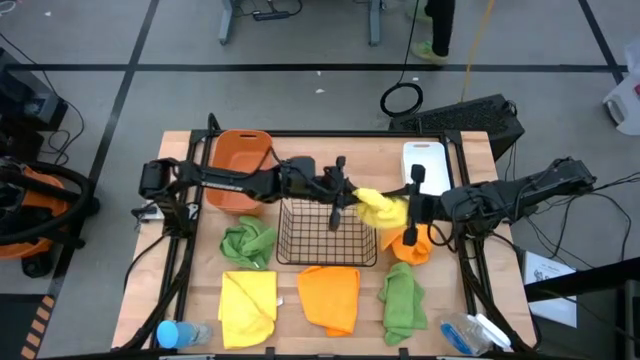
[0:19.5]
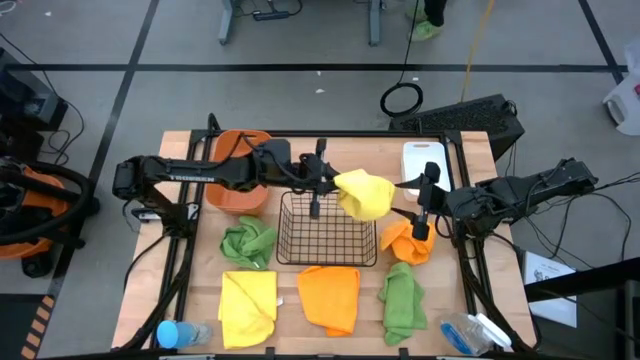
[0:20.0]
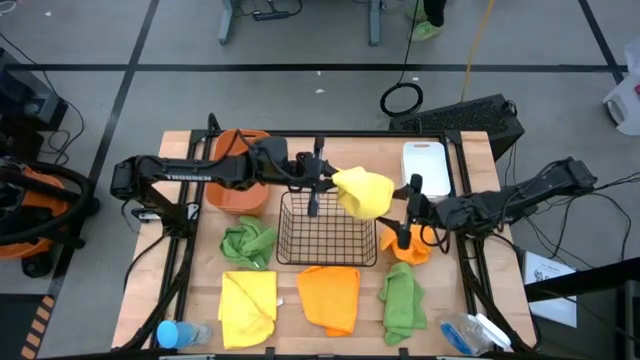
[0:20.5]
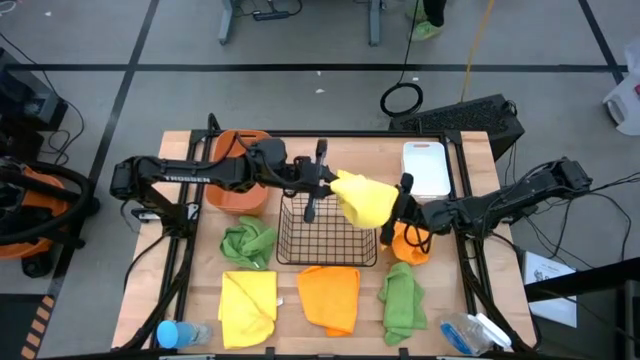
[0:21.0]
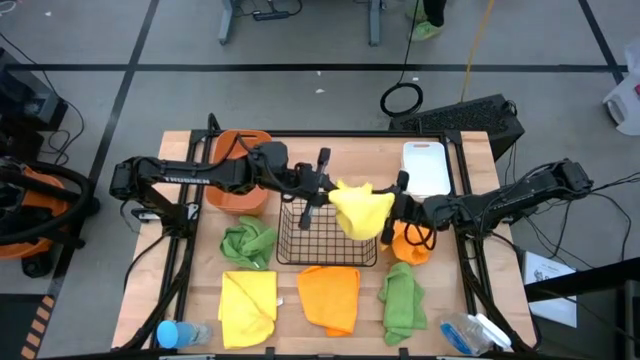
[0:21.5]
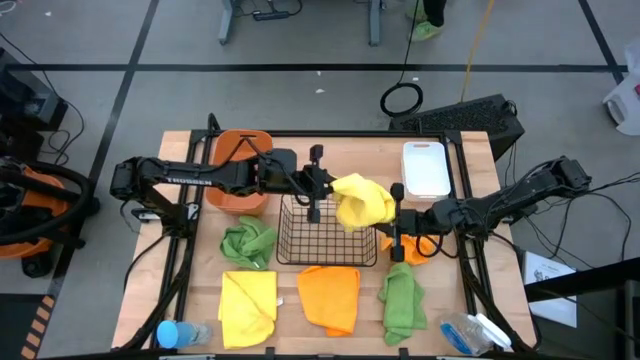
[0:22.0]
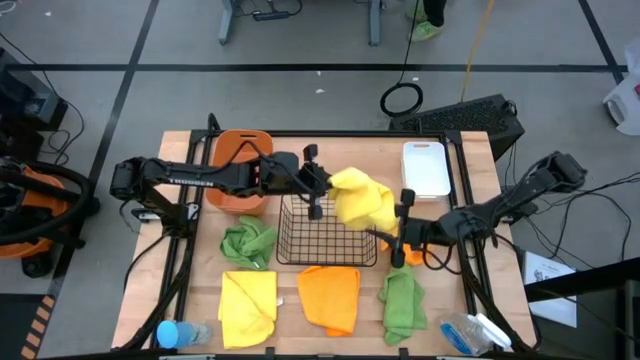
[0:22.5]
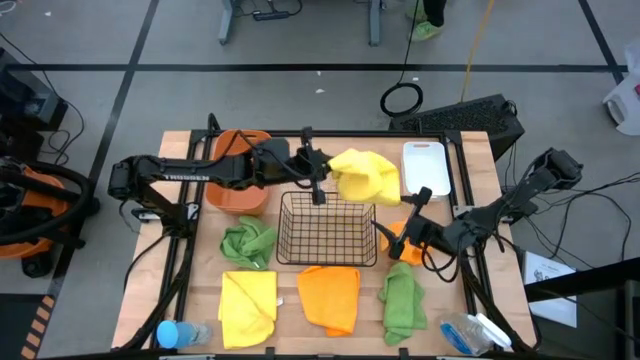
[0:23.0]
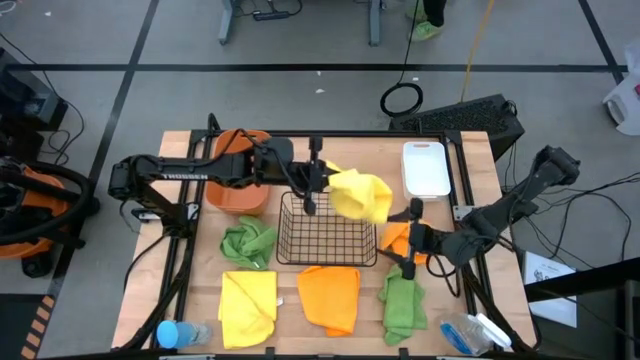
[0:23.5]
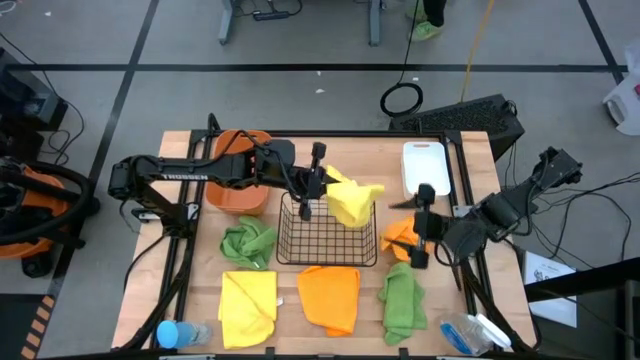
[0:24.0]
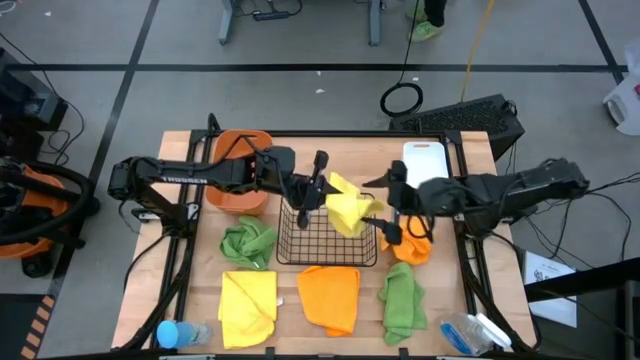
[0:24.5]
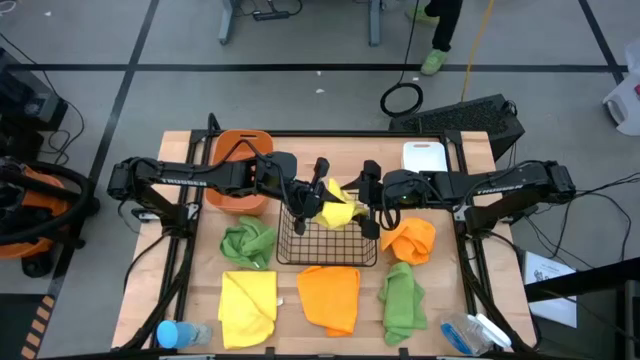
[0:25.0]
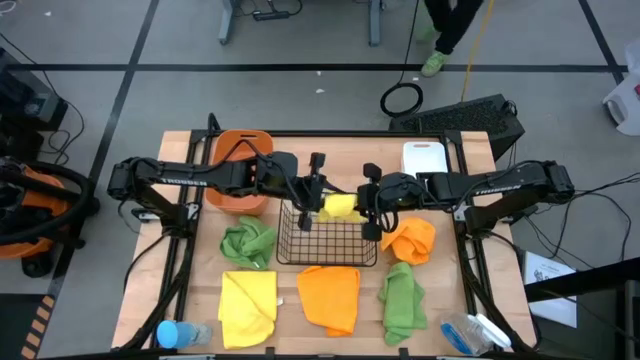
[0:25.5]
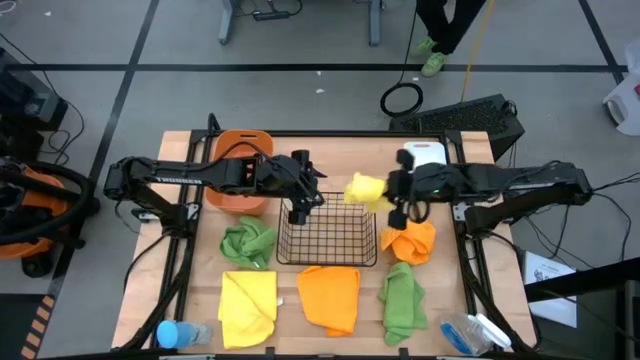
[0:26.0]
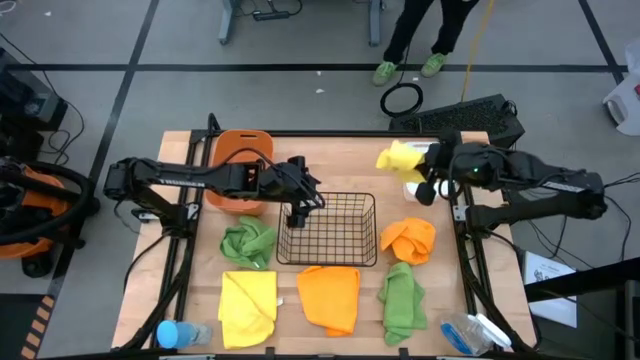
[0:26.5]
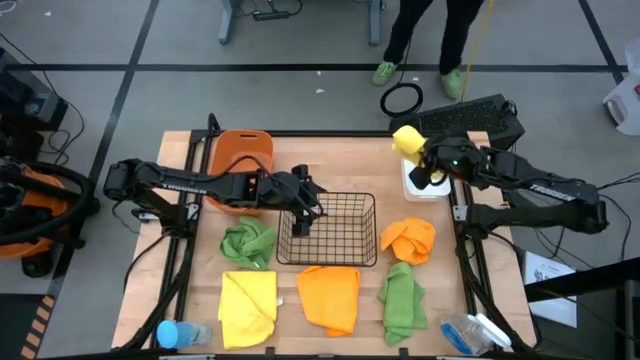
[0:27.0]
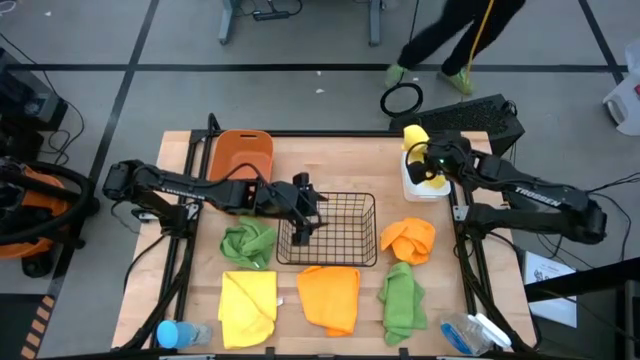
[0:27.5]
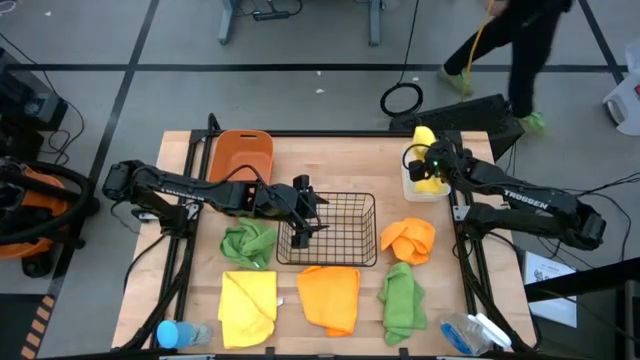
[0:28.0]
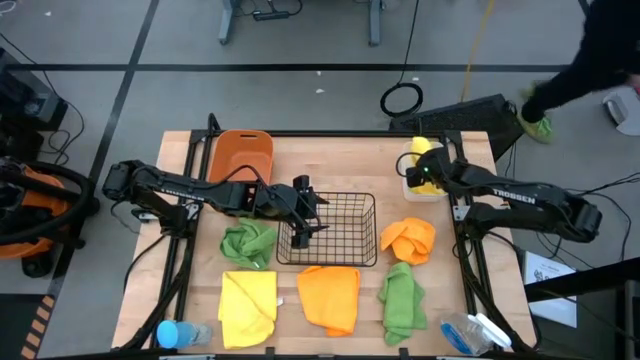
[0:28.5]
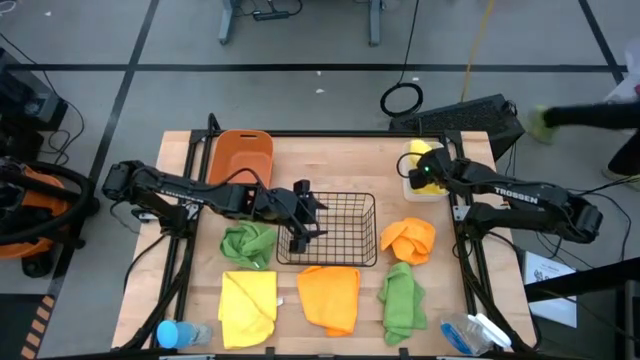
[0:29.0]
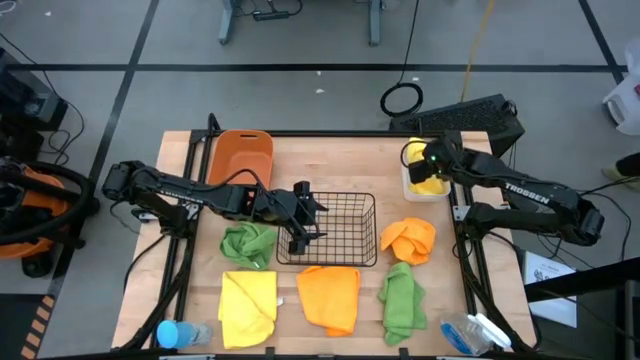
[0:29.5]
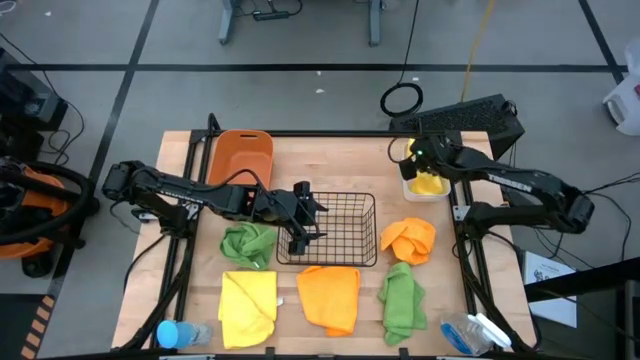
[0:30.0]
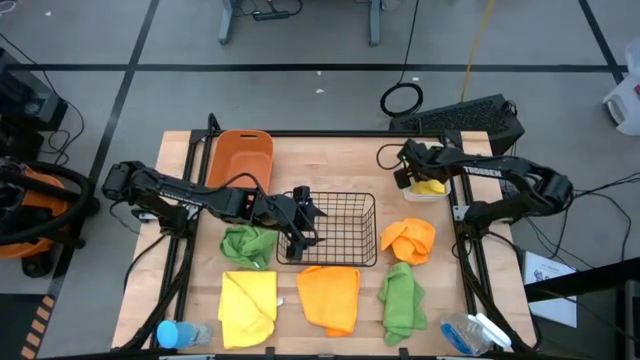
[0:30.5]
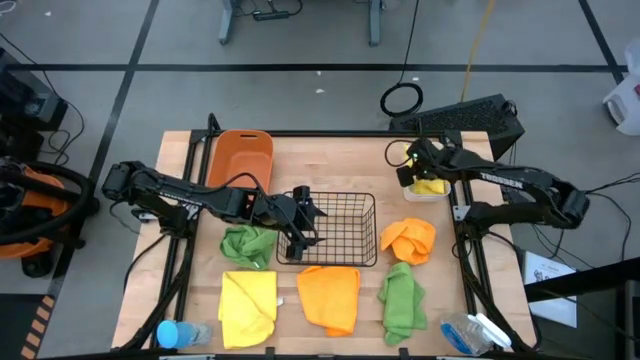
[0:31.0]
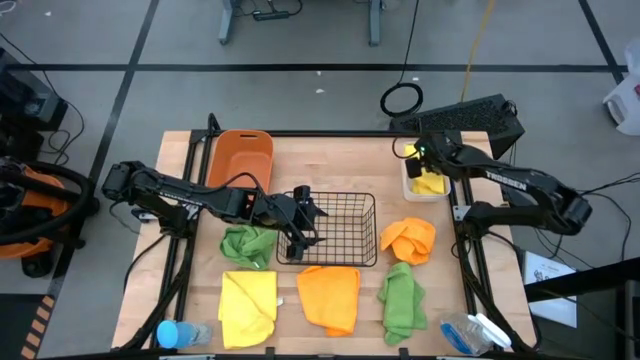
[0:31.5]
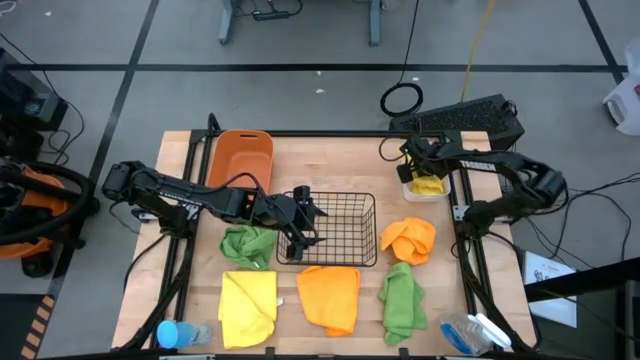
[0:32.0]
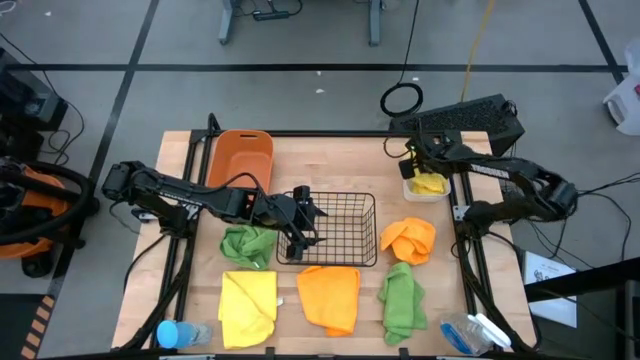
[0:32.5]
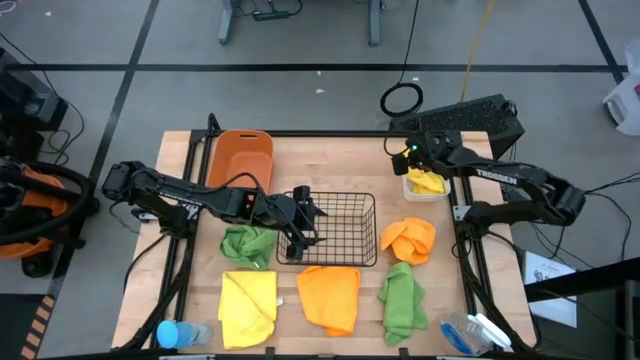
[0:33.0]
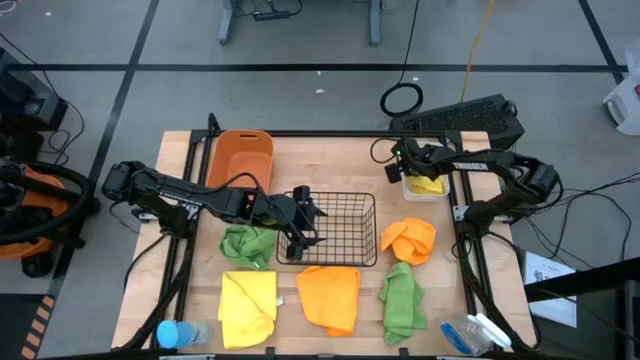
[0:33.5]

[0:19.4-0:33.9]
Task: Sort microfiber towel by color & place in baskets
Put the top yellow microfiber towel into the white bin

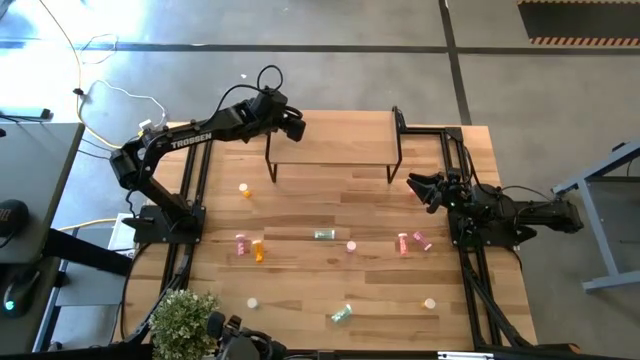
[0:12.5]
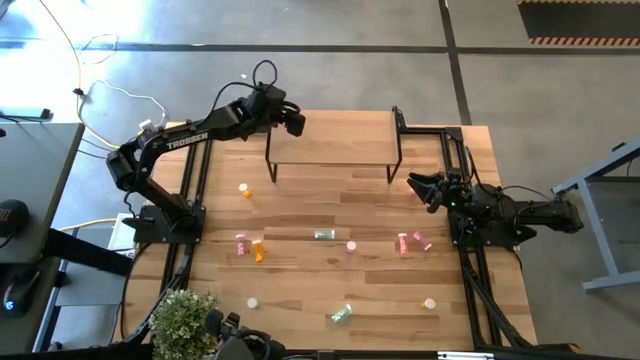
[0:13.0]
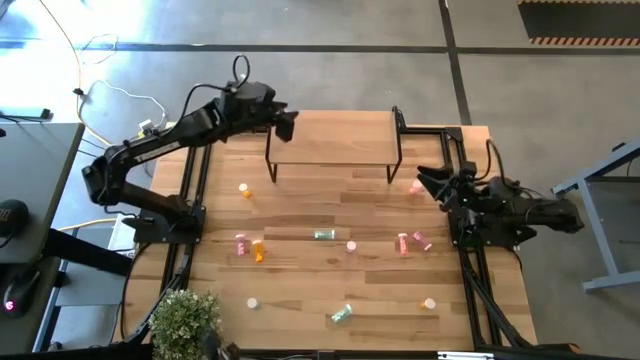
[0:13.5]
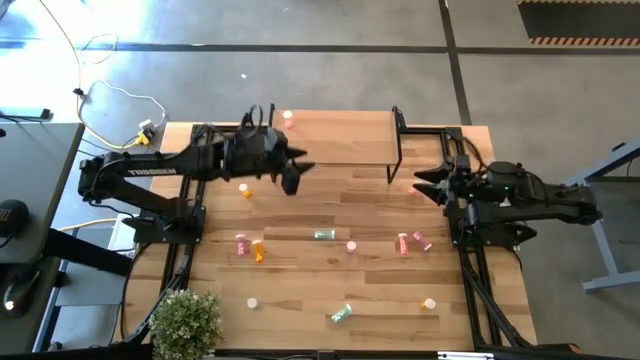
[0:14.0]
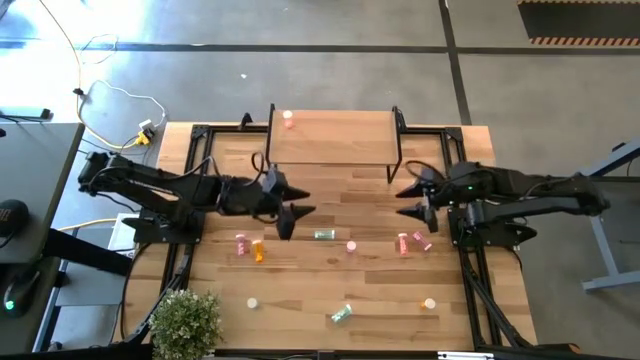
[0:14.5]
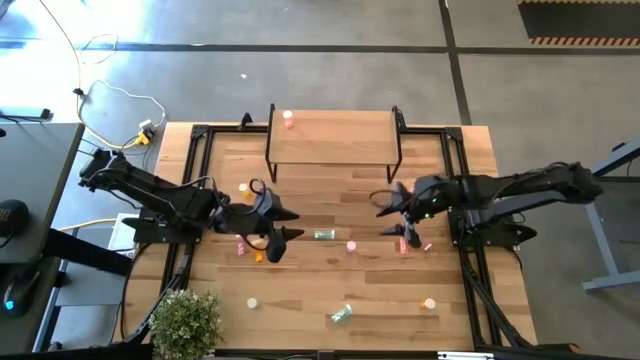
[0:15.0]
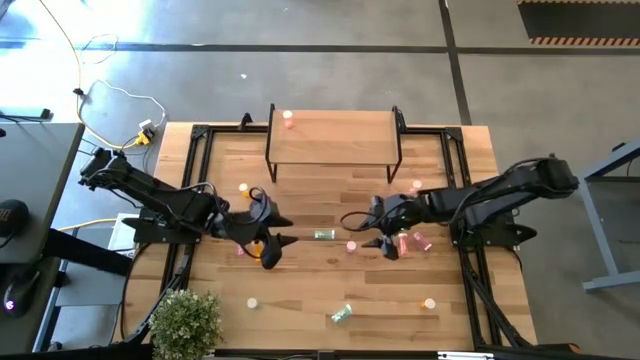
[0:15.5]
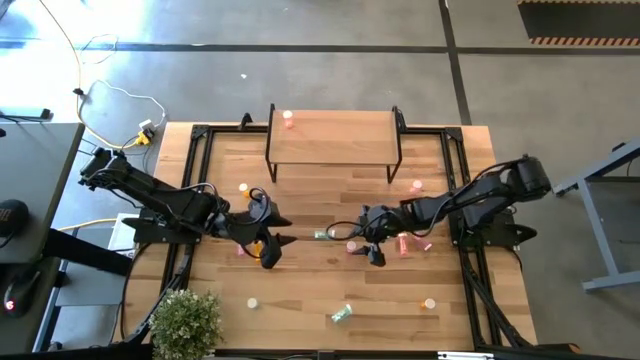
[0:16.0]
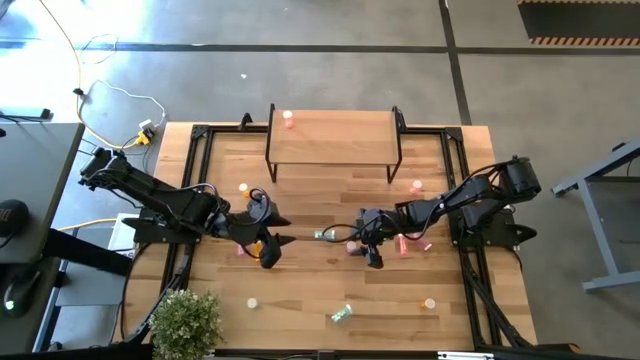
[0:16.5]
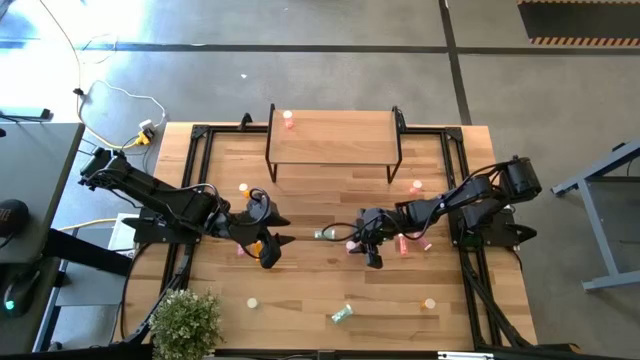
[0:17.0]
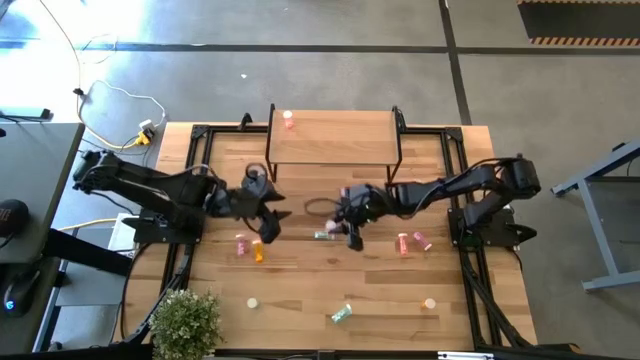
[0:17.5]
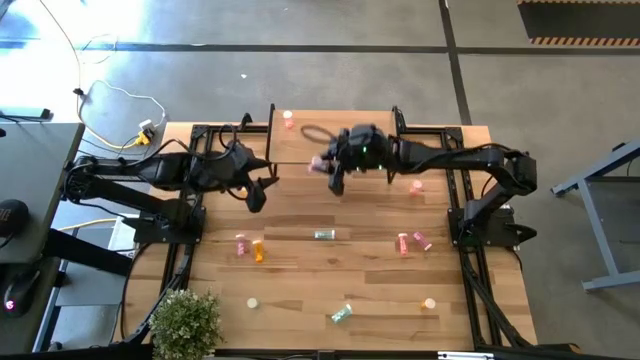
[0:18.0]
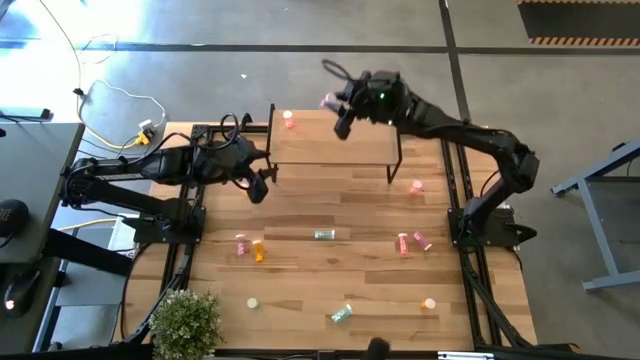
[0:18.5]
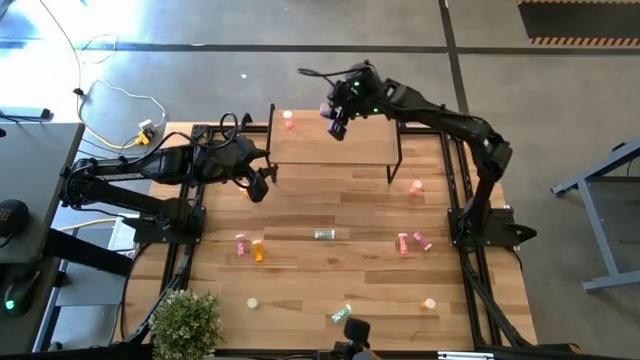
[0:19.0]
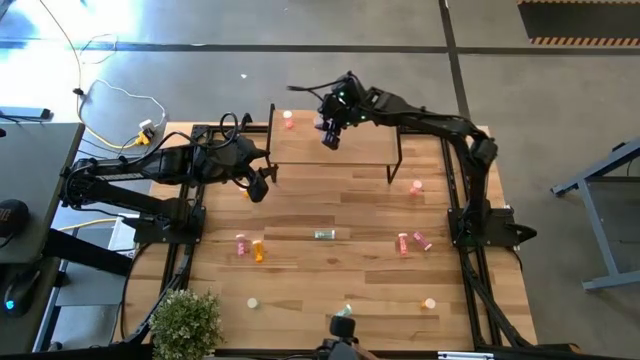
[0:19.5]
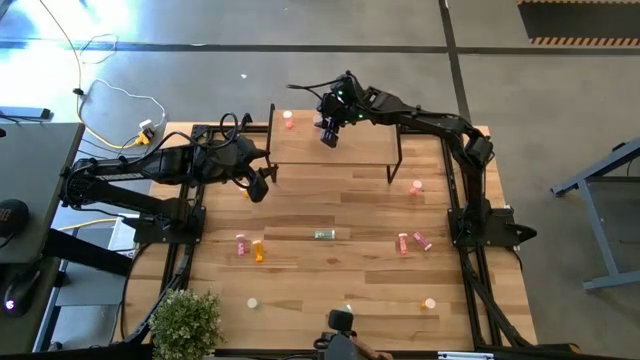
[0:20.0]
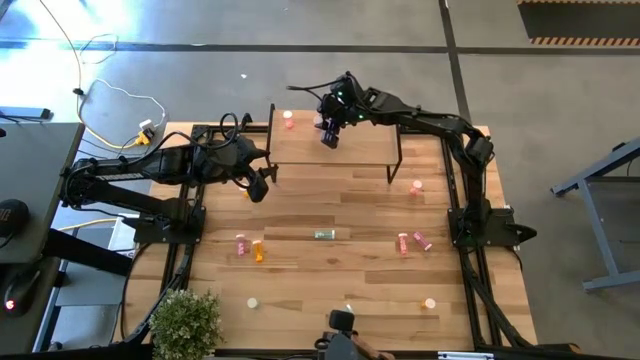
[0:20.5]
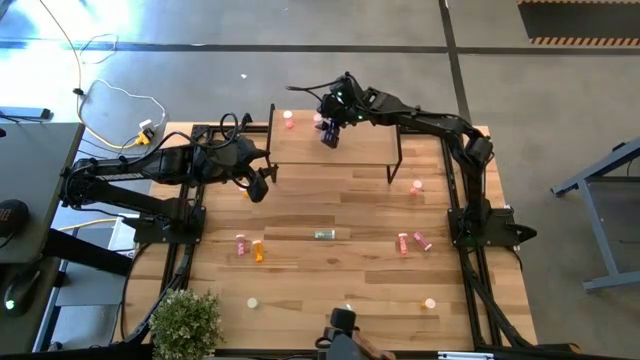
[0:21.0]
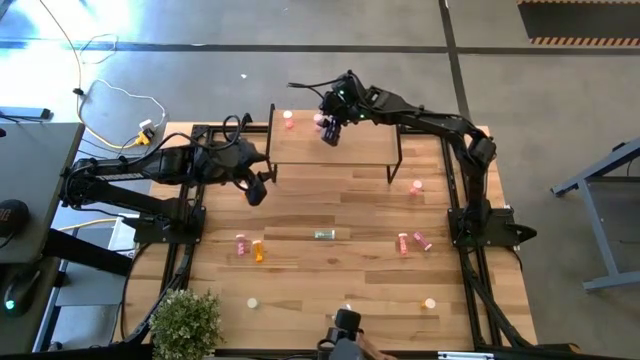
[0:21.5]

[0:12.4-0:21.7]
Task: Pick and place medicine bottles onto shelf by color
Put the middle violet pill bottle on the shelf
